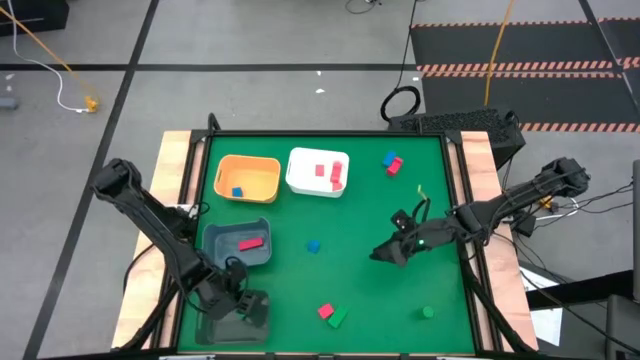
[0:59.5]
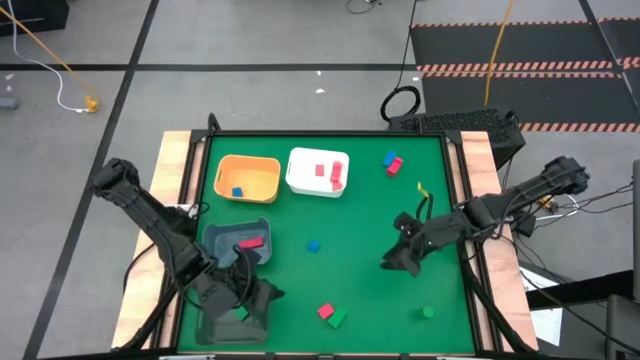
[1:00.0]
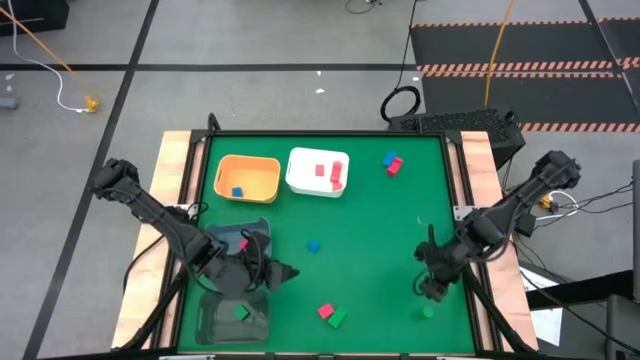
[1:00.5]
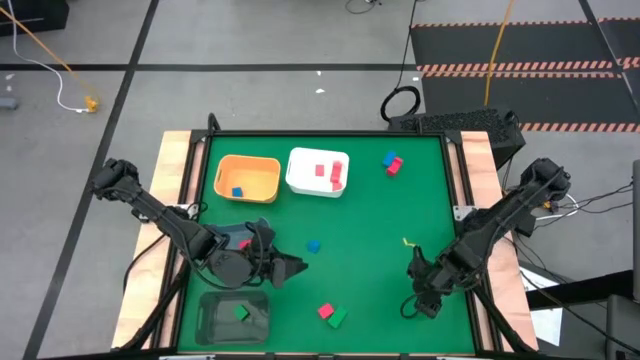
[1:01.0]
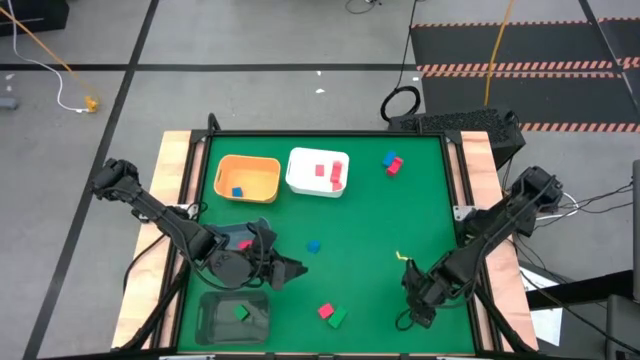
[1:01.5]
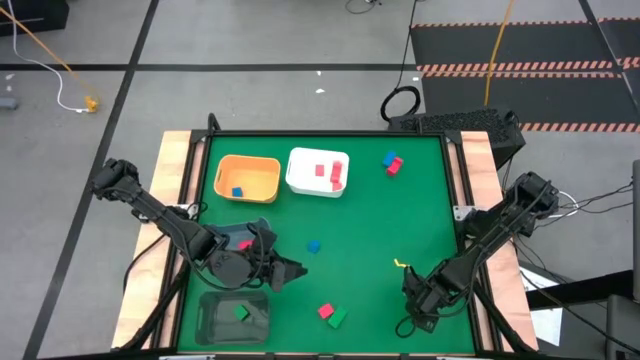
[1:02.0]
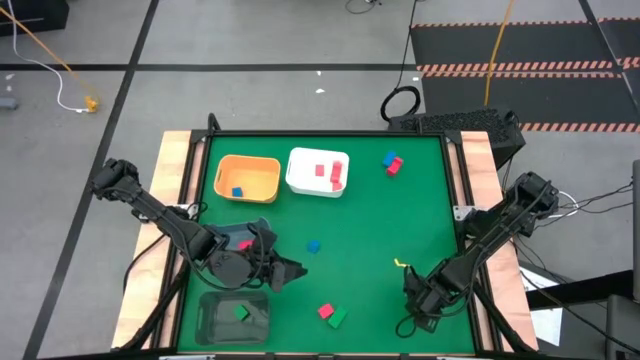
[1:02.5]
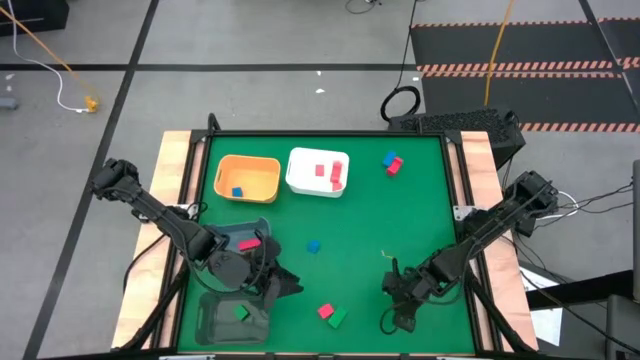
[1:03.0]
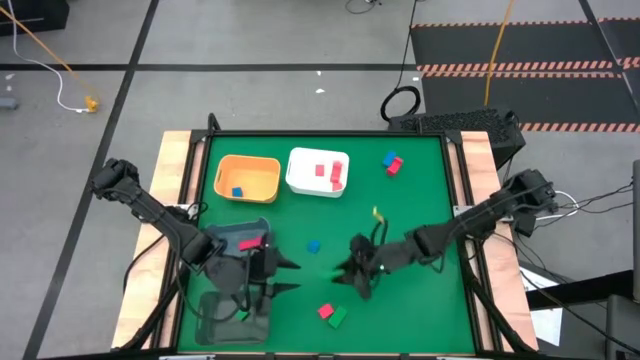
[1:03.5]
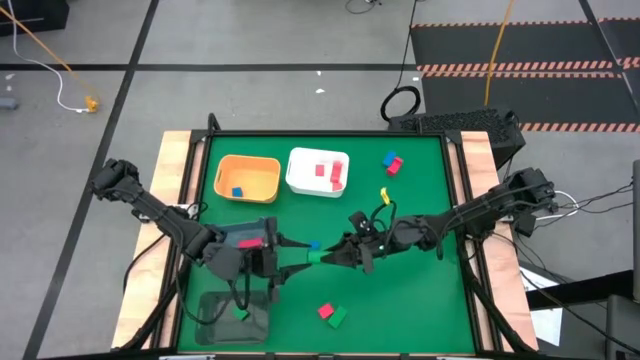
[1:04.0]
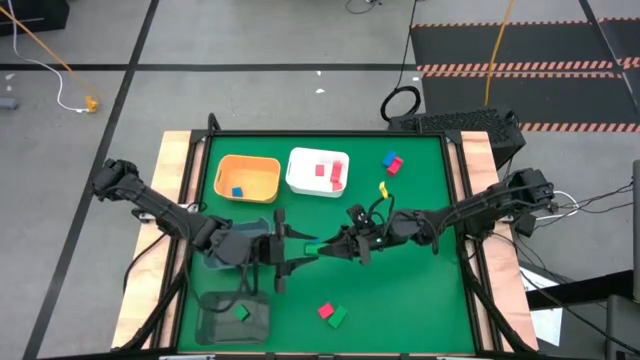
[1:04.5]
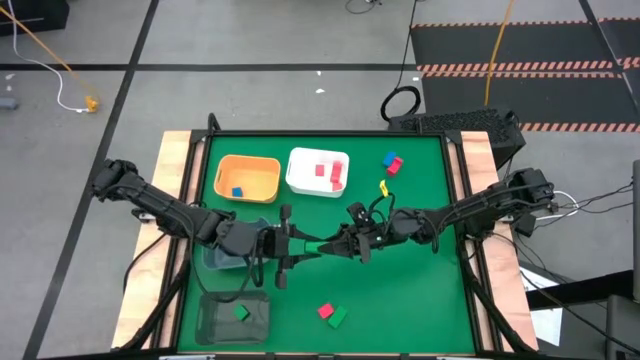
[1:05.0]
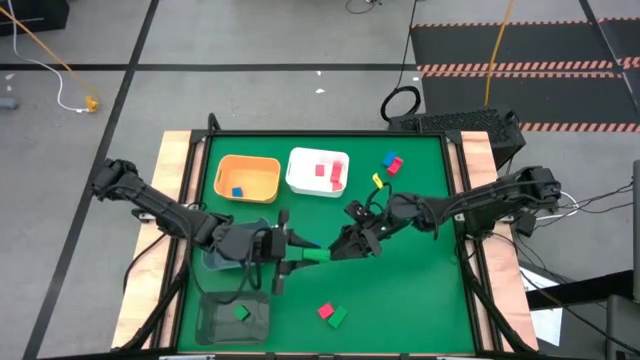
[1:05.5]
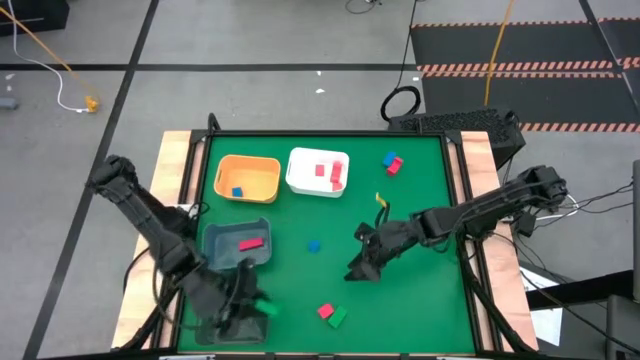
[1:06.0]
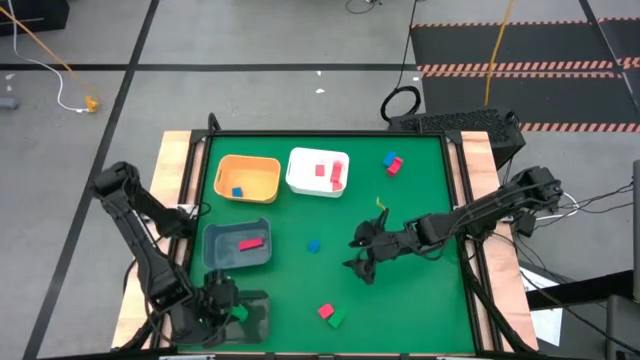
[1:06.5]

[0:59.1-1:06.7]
Task: Sort & place blocks by color
Put the right green block into the black bin

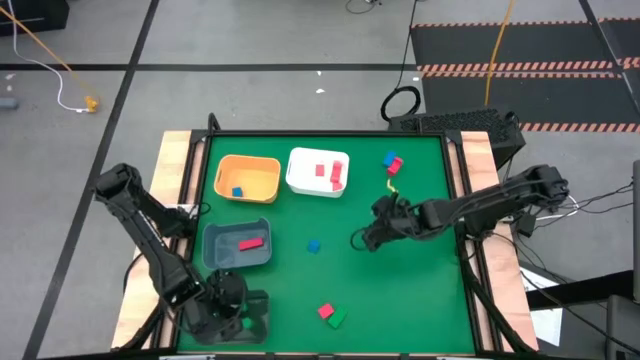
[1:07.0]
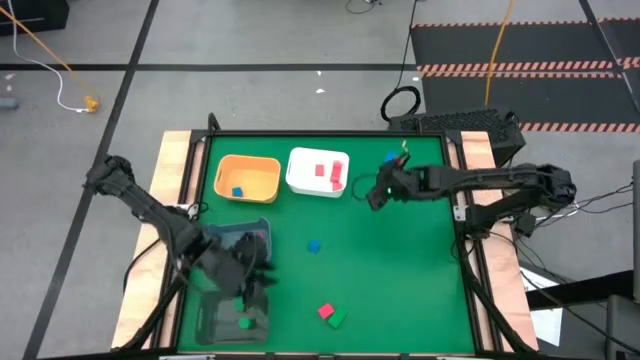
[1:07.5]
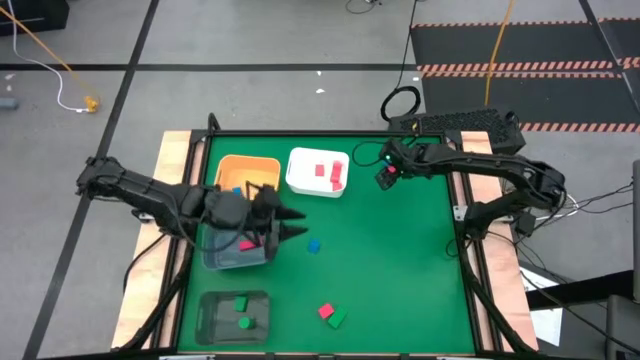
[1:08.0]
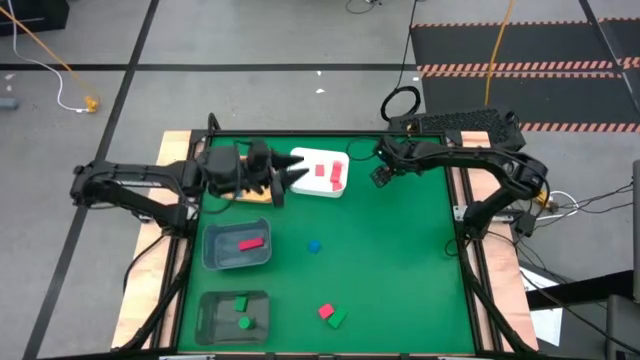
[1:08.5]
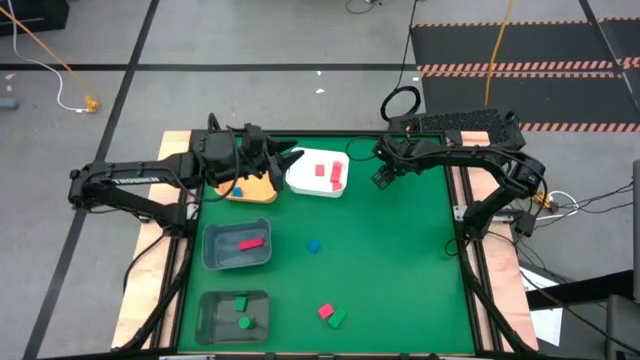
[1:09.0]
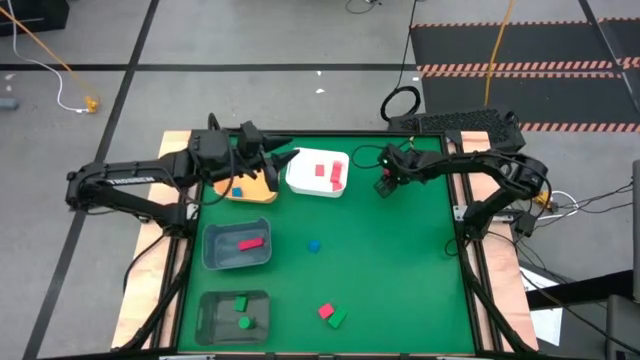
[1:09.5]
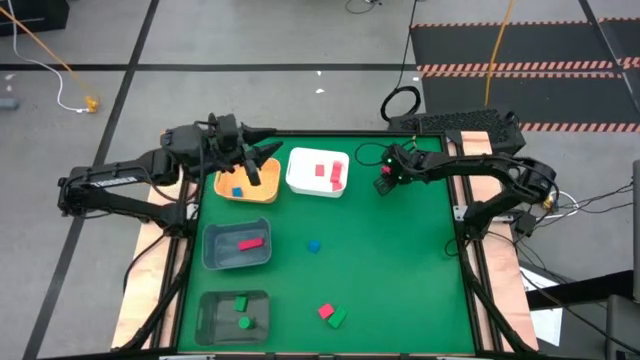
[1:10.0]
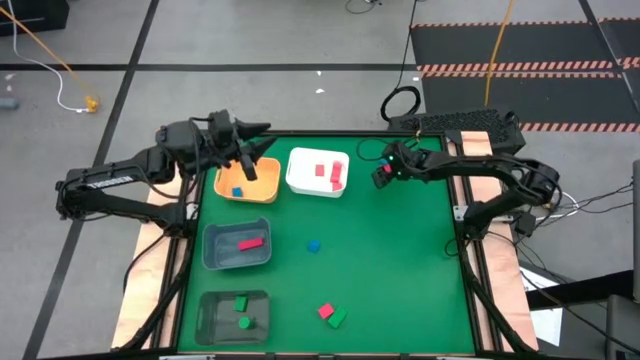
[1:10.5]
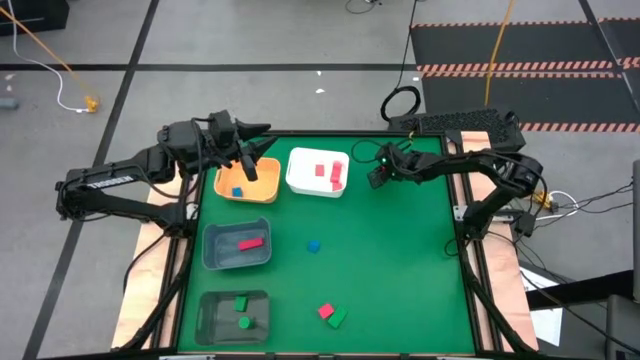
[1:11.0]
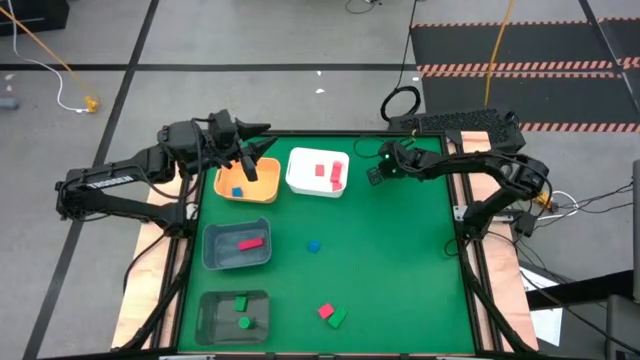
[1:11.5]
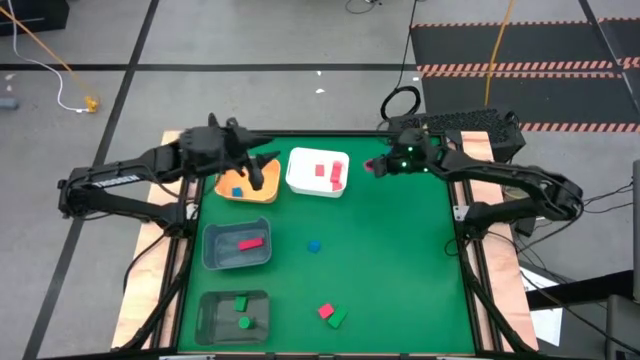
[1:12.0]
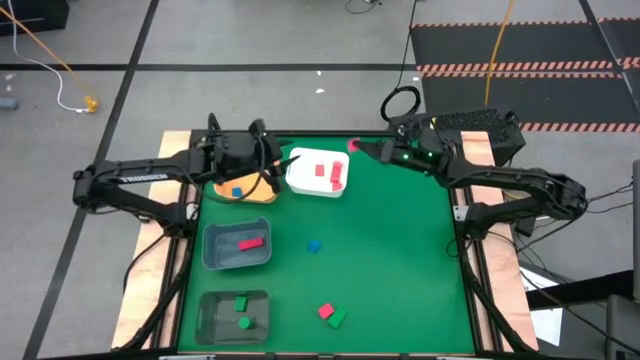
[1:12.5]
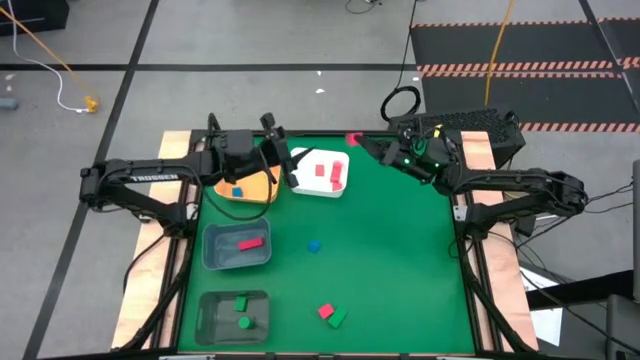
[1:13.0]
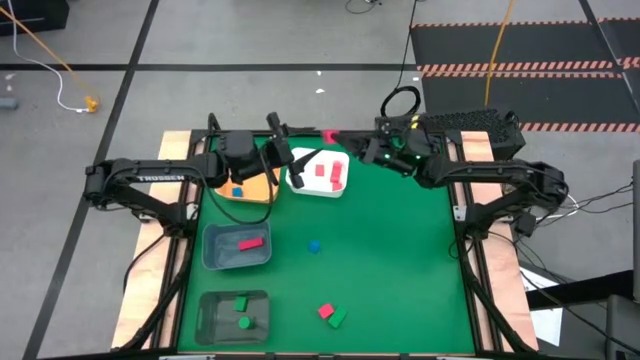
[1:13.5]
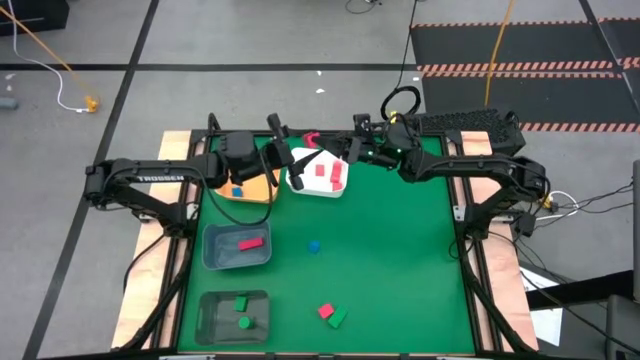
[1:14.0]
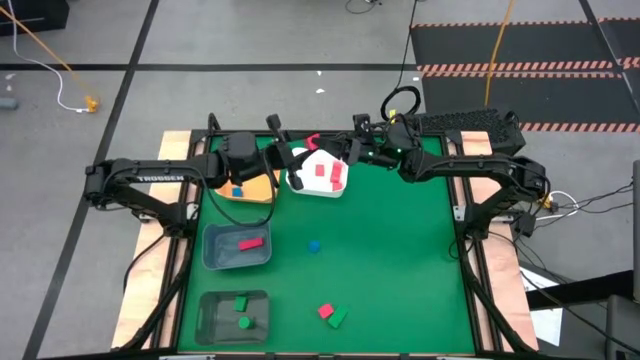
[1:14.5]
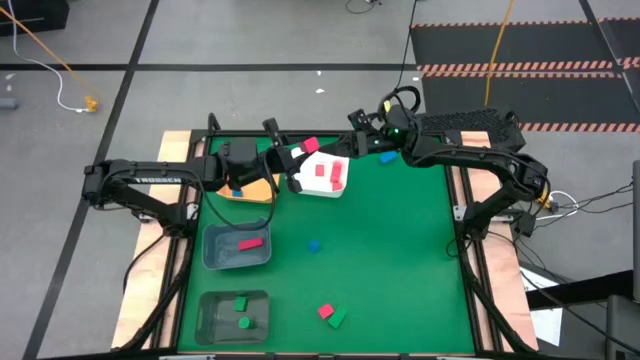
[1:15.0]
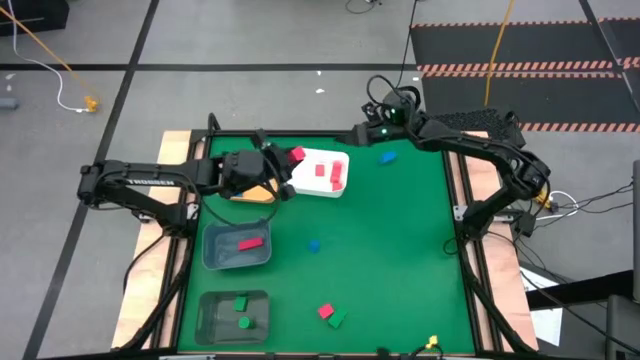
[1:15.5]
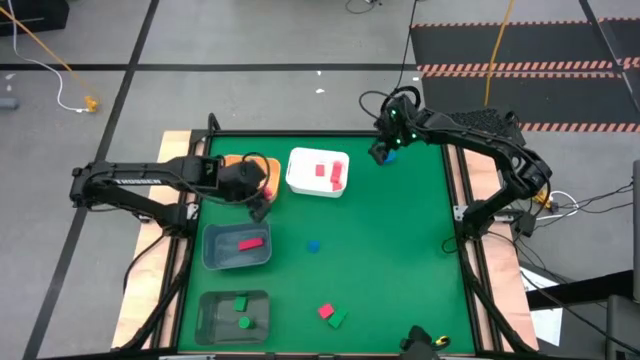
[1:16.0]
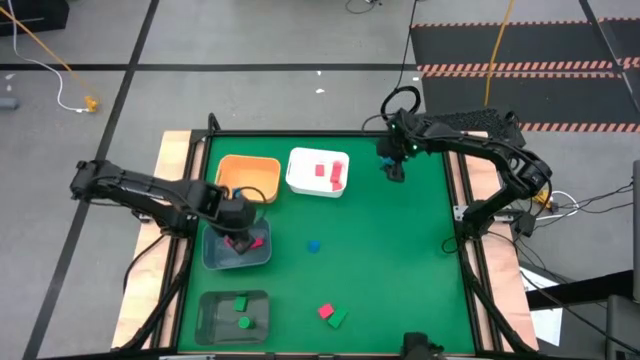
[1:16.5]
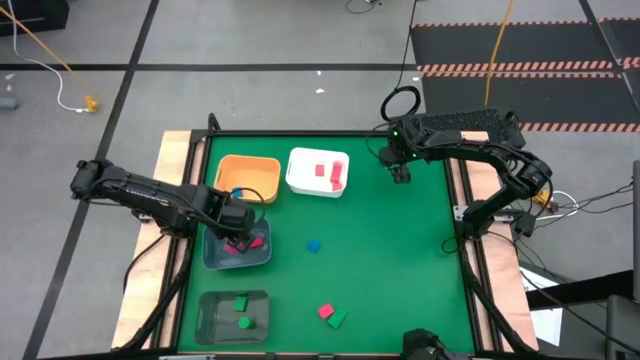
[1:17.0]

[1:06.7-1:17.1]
Put the top red block into the grey bin

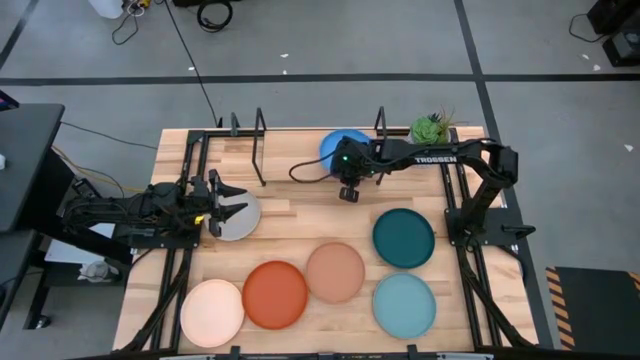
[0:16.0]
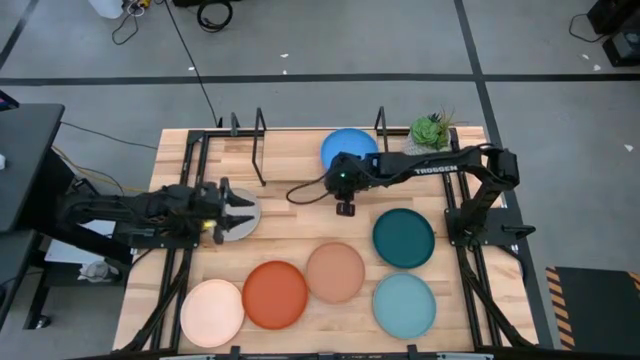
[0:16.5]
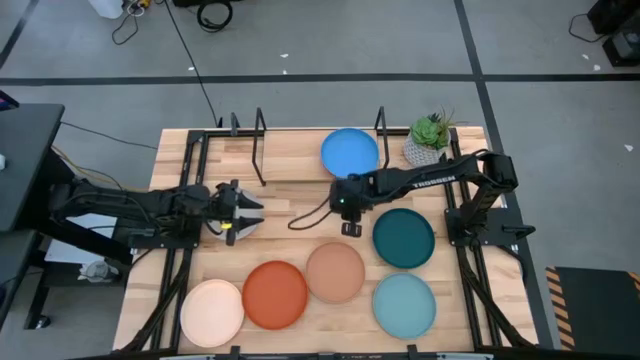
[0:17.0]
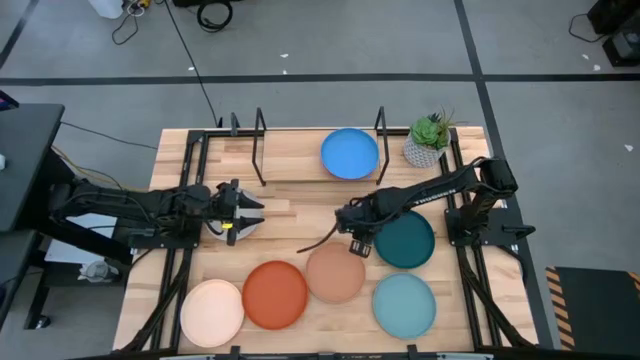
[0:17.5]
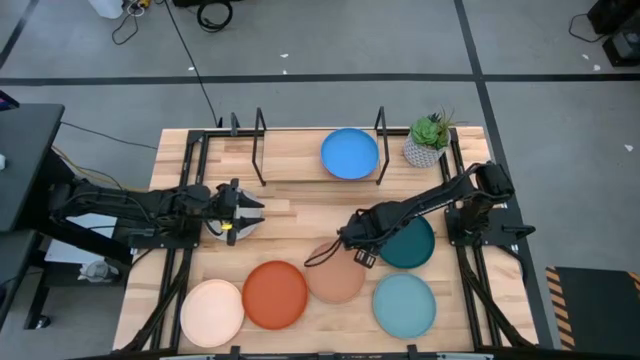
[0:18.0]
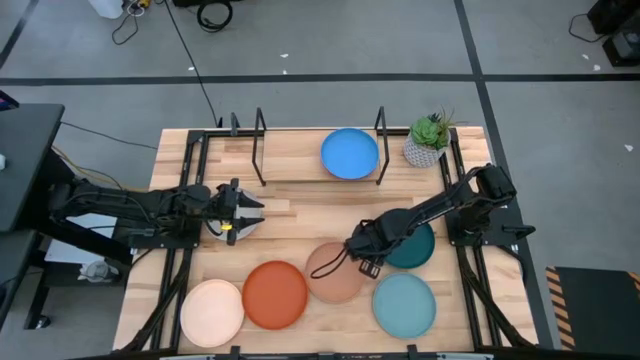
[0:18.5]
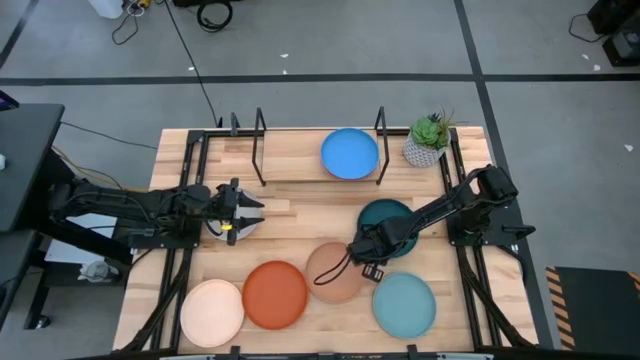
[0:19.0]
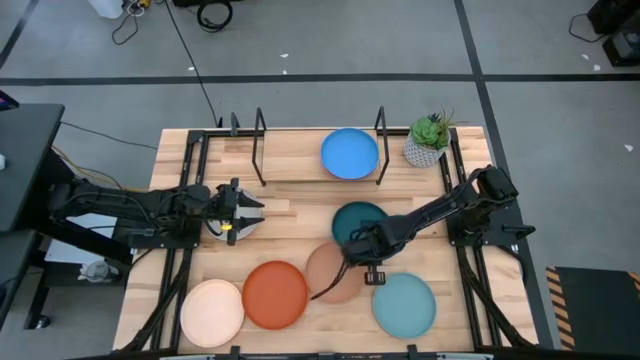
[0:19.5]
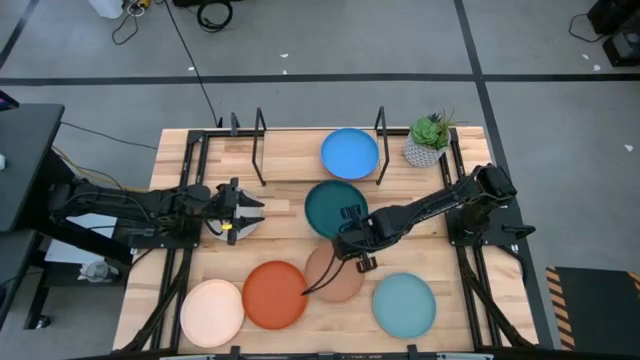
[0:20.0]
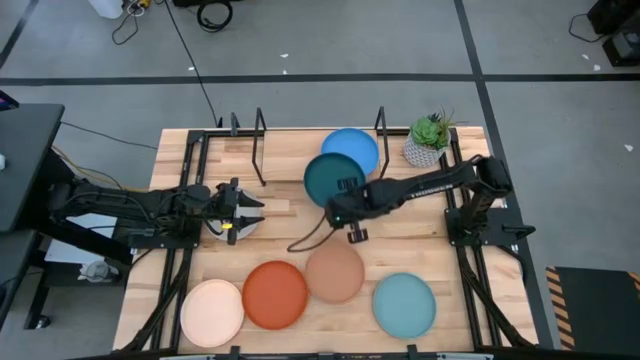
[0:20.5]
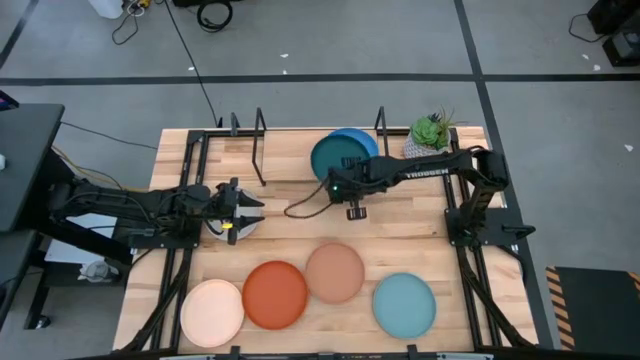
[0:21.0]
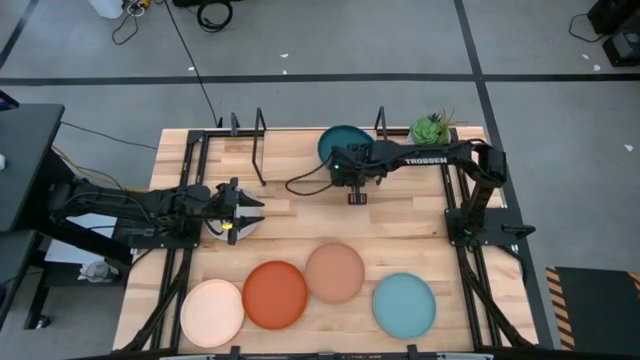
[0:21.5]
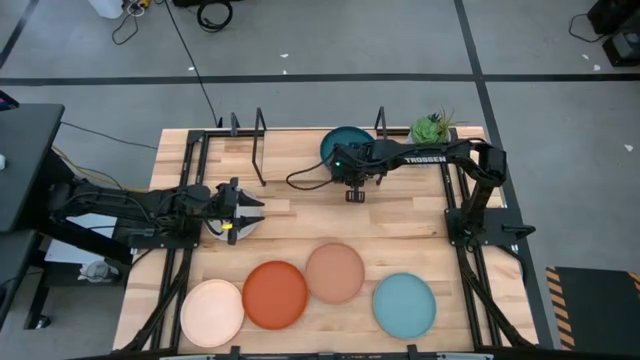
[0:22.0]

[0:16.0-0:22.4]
Task: Place and stack plates onto a shelf
Stack the dark green plate on top of the blue plate on the shelf
